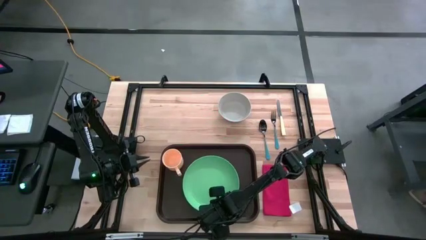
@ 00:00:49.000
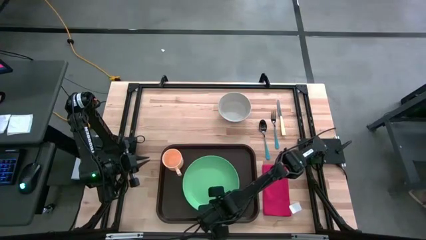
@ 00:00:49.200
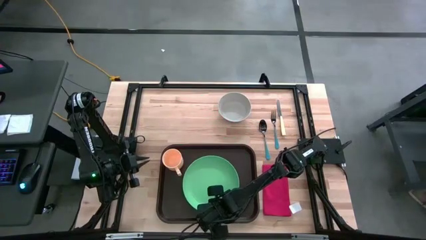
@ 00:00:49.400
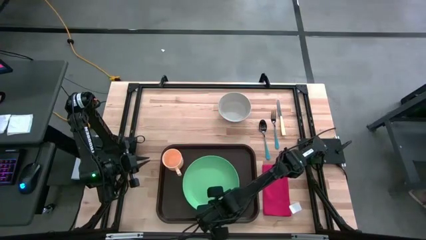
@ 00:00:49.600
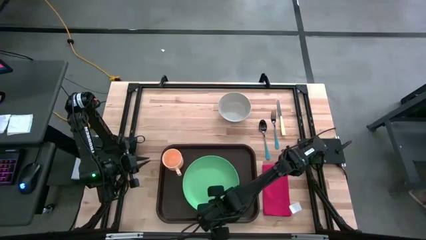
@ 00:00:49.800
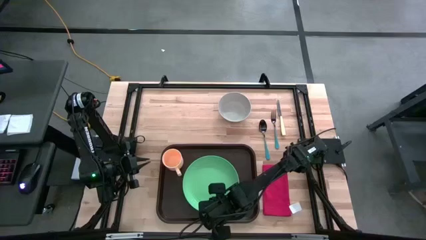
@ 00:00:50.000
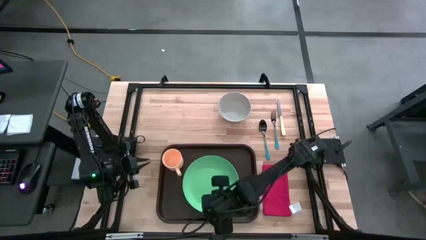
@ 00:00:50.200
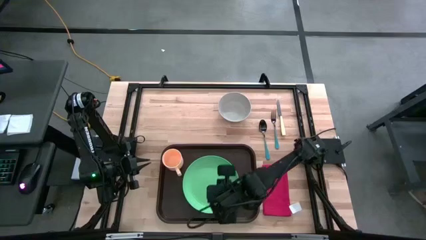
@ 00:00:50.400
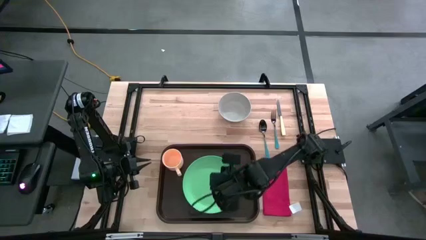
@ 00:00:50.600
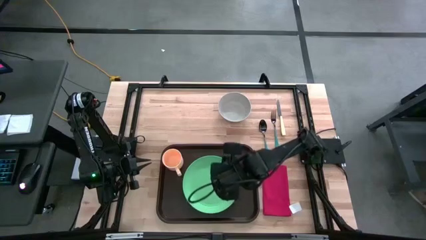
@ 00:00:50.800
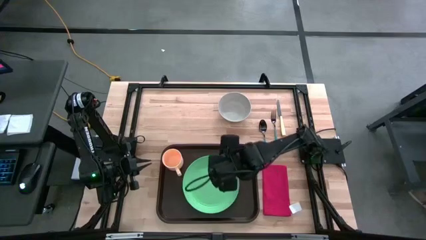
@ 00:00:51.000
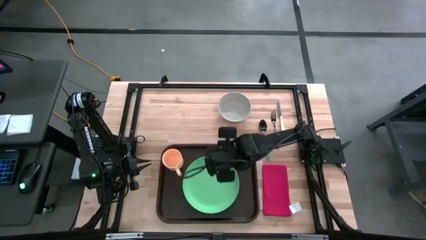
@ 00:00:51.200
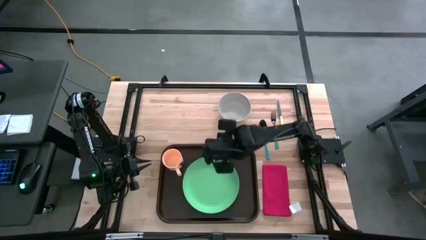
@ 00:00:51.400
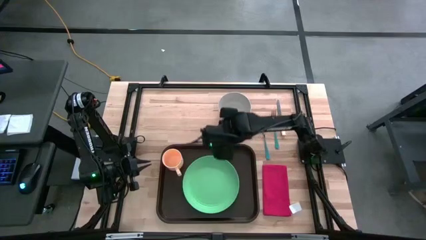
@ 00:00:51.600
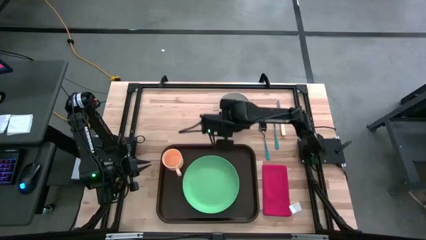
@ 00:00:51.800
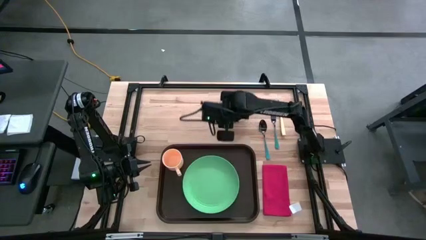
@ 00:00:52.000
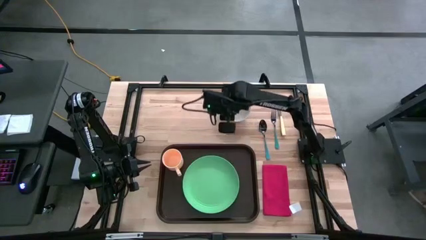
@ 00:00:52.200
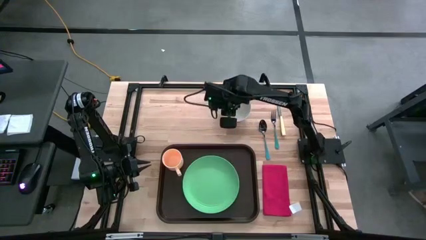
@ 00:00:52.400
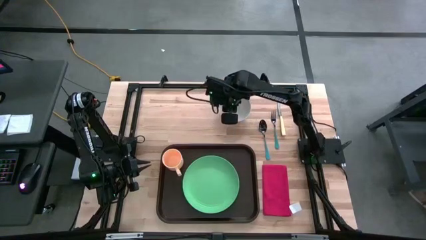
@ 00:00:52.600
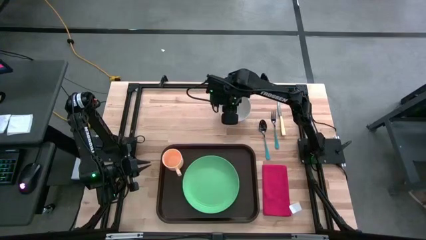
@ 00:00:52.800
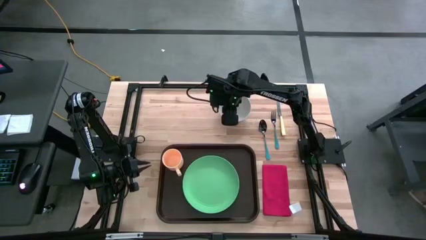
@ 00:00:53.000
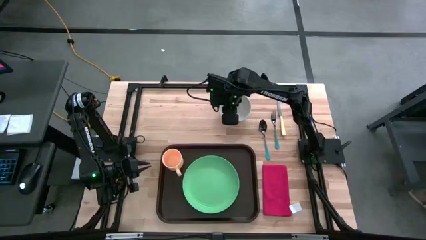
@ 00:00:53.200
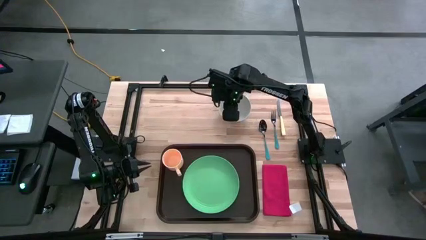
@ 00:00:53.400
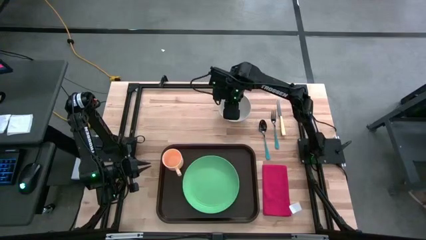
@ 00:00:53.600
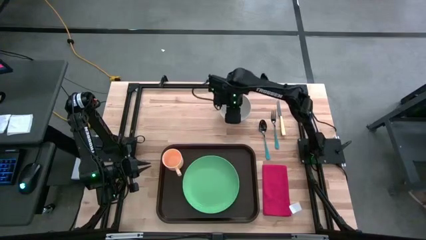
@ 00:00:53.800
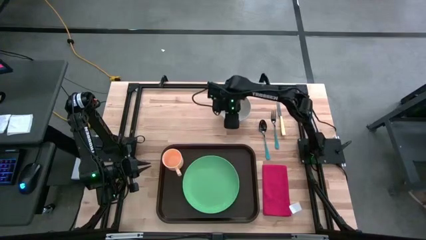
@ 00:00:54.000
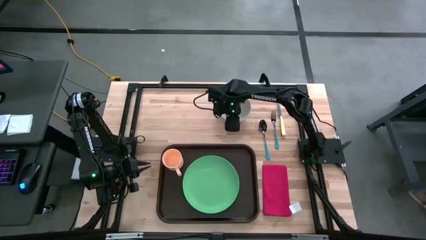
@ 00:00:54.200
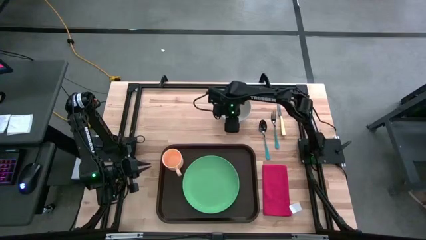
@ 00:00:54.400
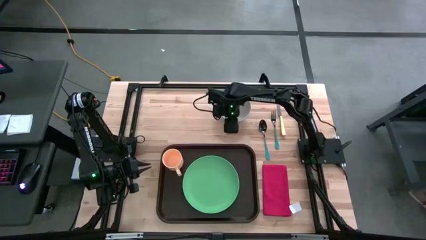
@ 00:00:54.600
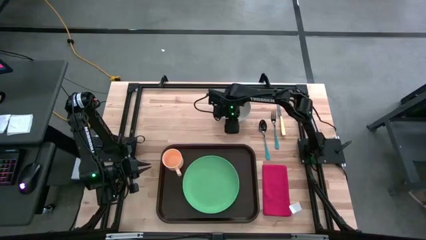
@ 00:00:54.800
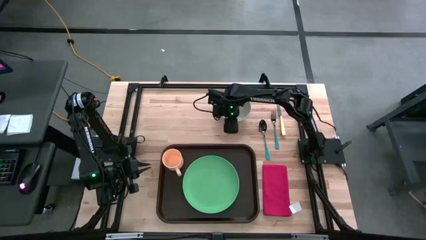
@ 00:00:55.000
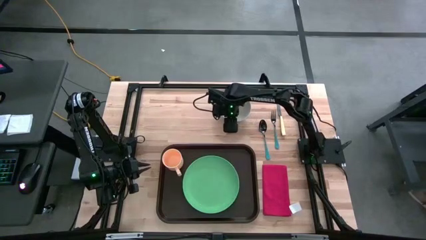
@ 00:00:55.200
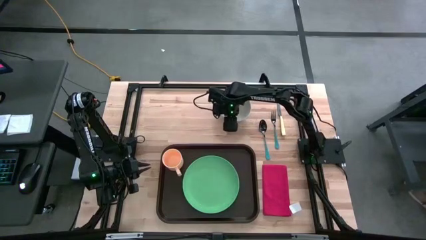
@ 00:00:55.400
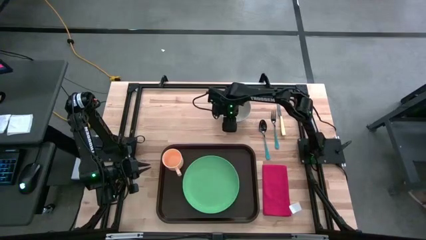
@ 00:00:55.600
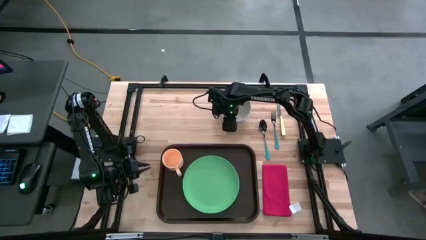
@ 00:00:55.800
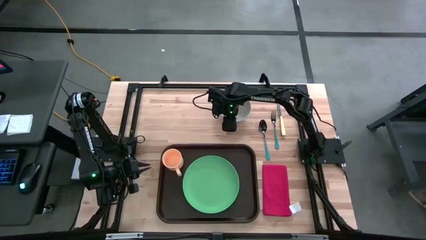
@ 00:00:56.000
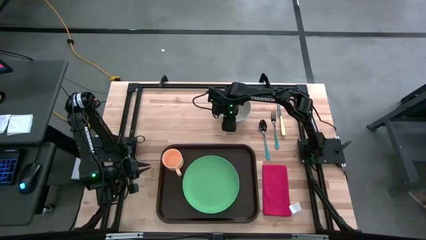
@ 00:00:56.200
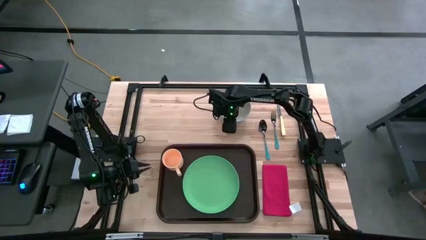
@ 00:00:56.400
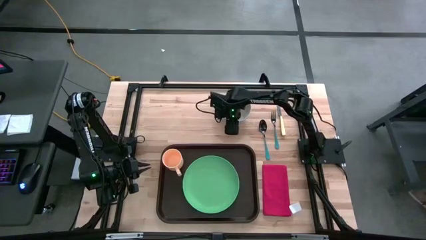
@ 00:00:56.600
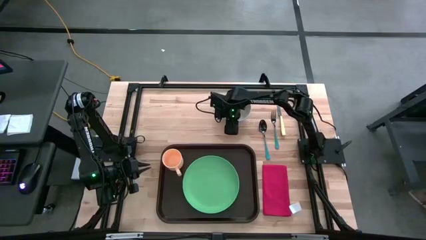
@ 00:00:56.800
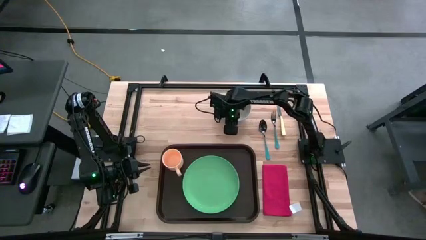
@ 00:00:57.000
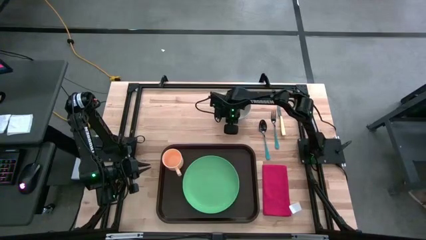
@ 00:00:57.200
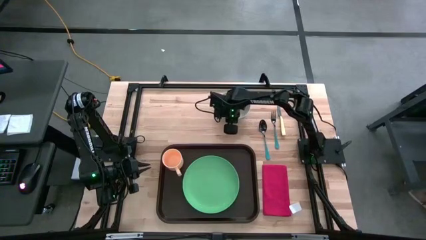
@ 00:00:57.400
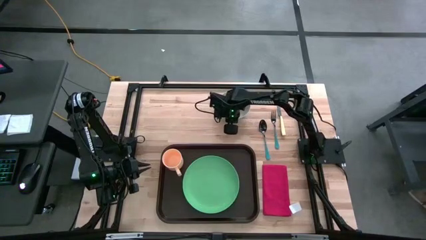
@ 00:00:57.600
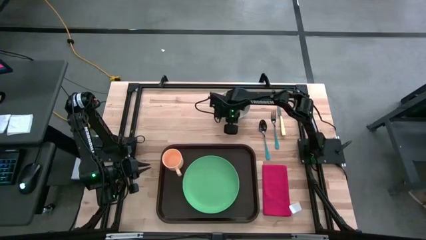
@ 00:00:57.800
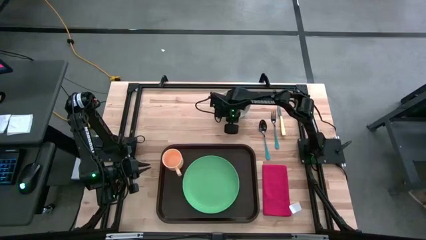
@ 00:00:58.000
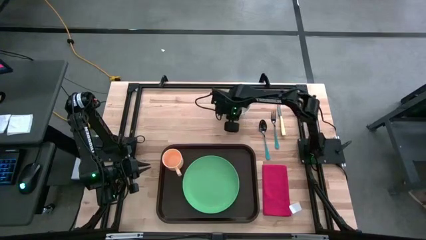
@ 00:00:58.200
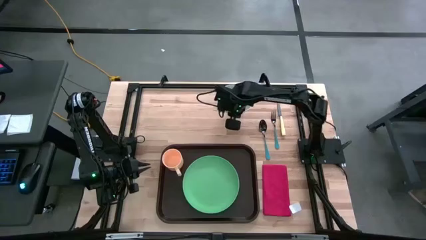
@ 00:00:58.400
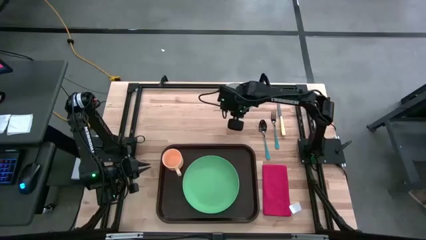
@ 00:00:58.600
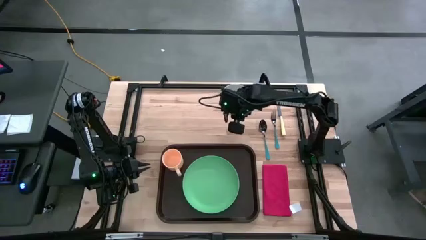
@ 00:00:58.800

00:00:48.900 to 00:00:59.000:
Task: Set up tray
Put the gray bowl on the green plate

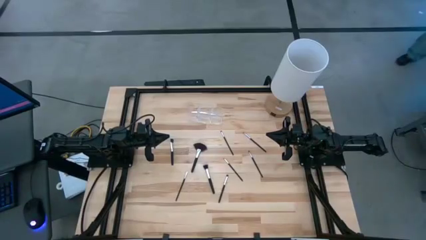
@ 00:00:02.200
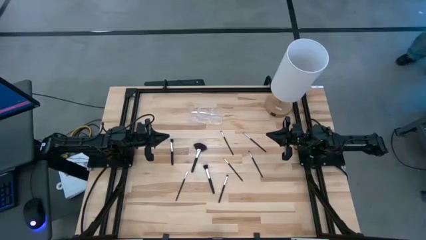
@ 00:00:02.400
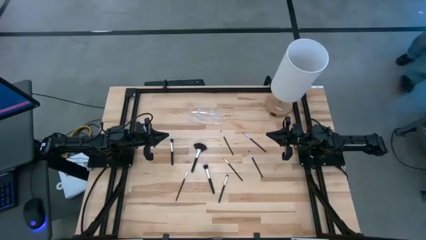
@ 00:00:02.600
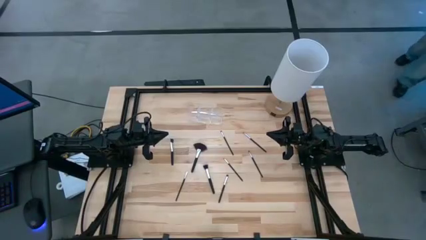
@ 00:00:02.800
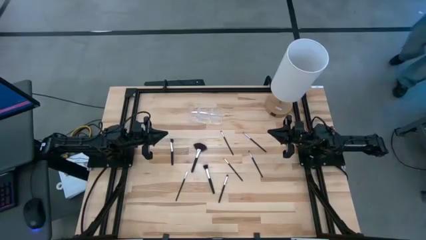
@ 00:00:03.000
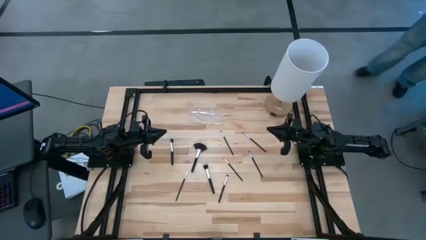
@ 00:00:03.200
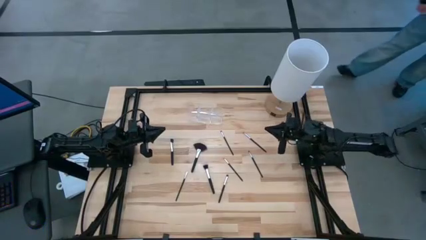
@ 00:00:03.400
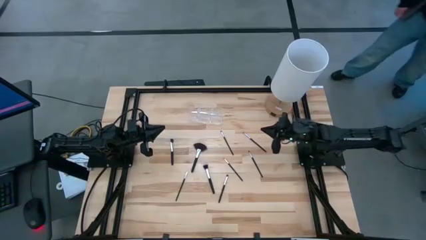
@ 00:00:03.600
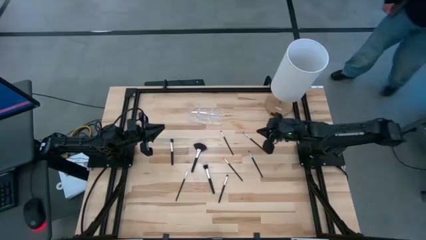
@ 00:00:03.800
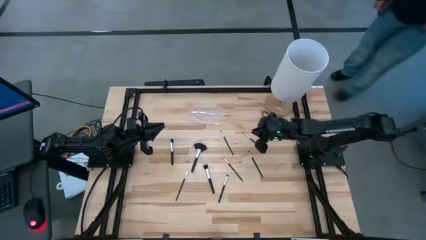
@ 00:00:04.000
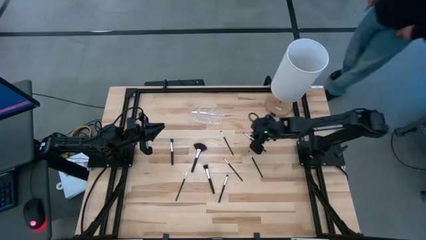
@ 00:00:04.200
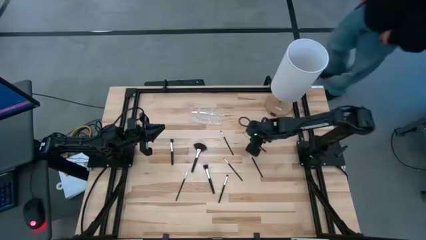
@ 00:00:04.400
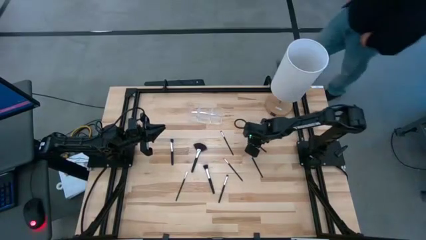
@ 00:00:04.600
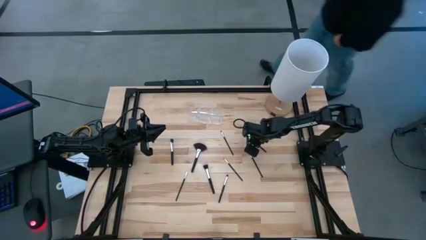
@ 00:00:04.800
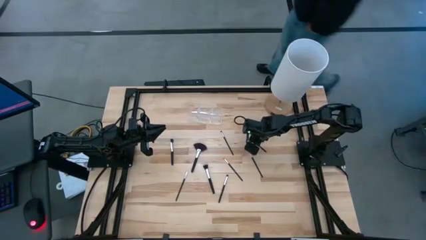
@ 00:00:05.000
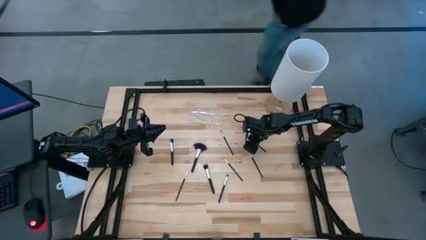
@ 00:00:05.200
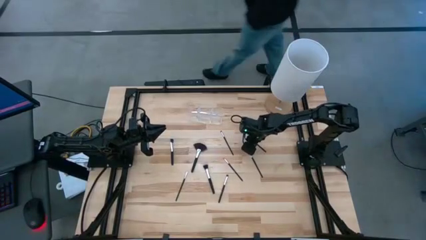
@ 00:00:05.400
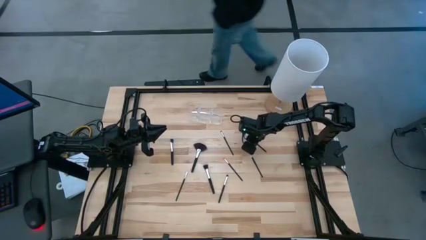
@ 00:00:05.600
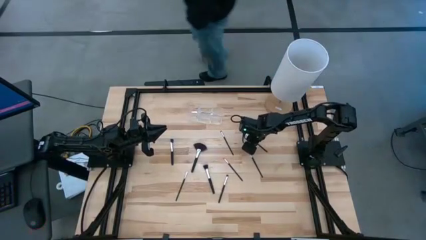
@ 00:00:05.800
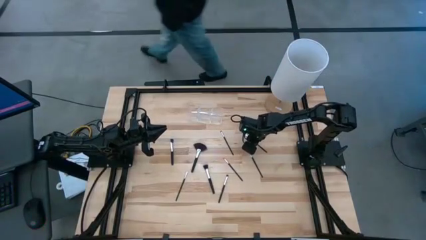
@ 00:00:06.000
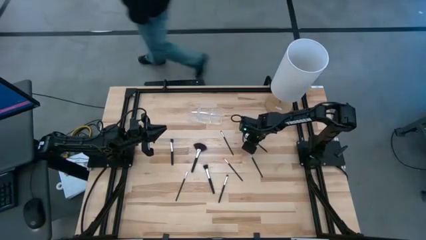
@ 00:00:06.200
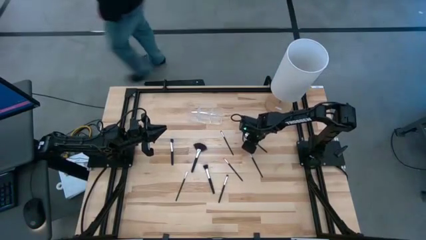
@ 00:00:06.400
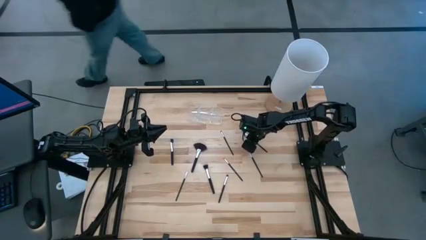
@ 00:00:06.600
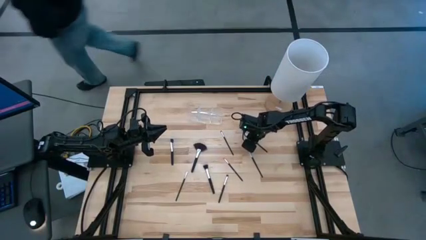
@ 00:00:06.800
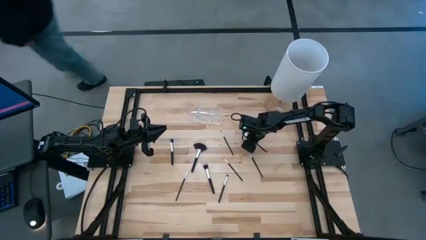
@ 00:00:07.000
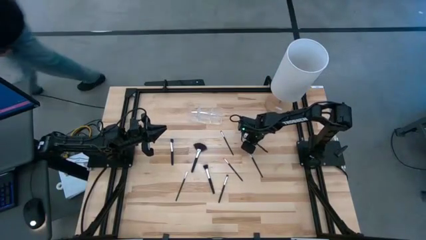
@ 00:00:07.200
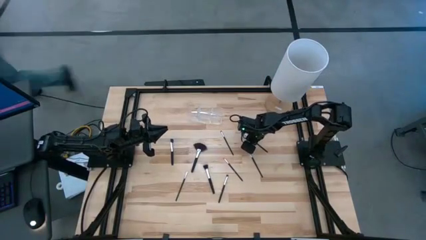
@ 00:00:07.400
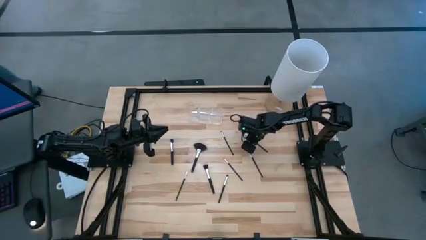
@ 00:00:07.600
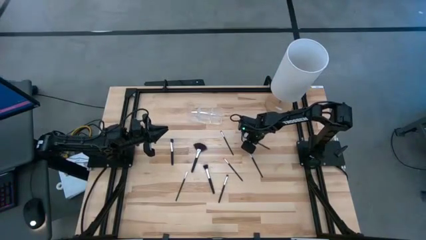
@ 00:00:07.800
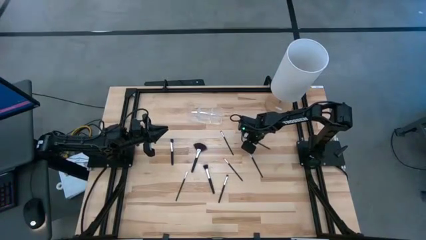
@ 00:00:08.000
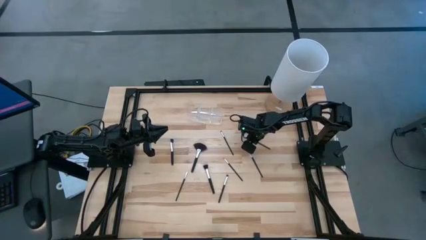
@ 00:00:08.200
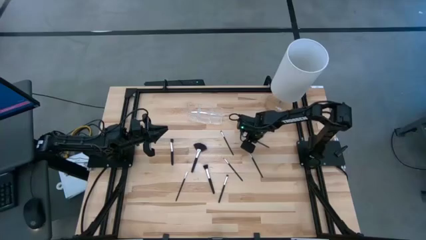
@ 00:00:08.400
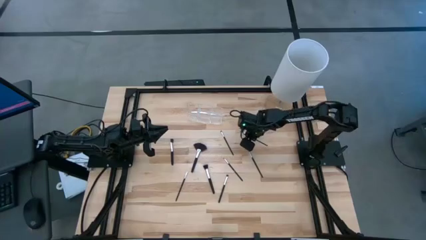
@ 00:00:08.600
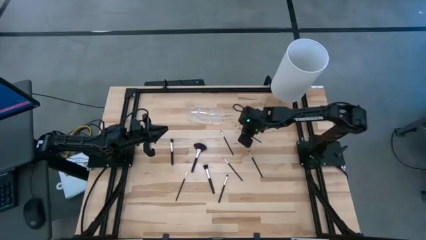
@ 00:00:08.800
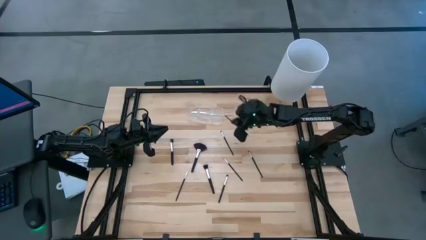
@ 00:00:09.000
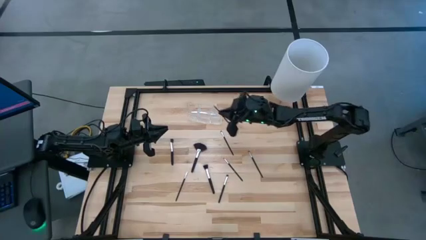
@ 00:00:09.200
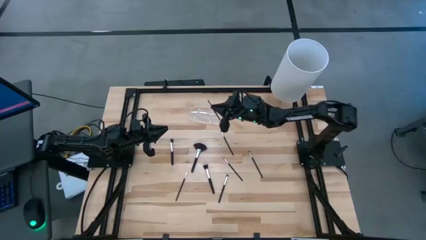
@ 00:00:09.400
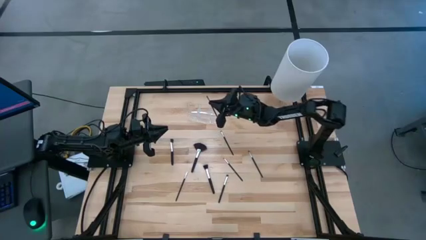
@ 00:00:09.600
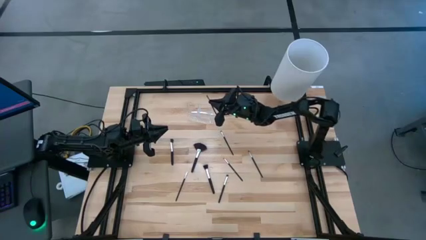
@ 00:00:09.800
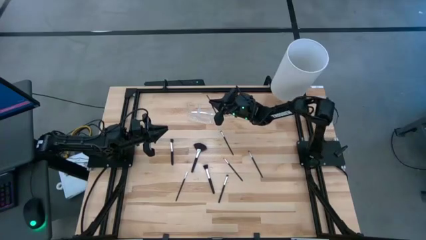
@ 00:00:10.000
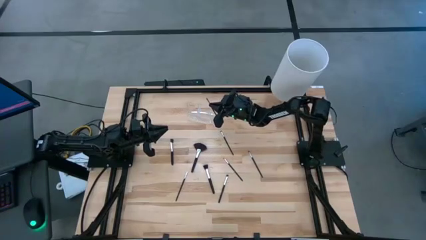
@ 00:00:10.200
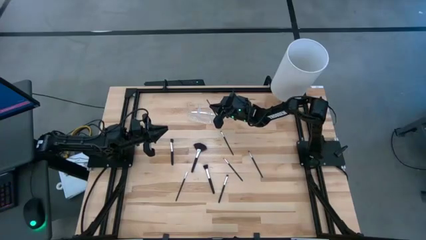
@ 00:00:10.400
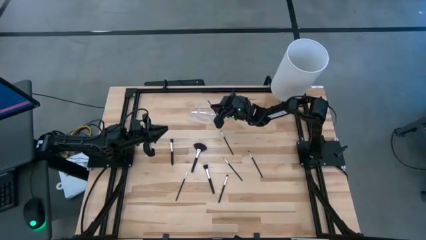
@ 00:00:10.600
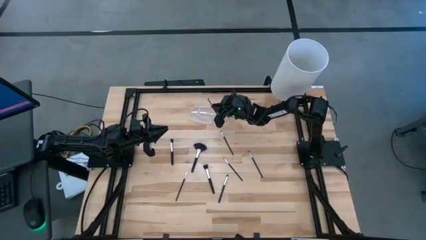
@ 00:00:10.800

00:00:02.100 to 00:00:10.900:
Task: Pick & Place Makeup Supplies
Put the makeup brush into the transparent organizer
